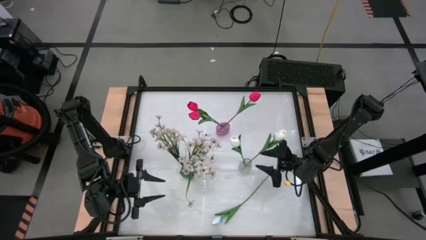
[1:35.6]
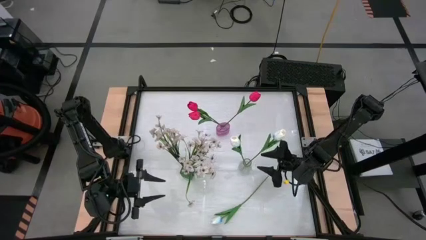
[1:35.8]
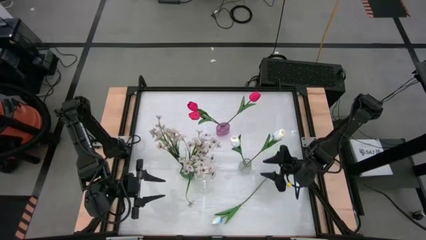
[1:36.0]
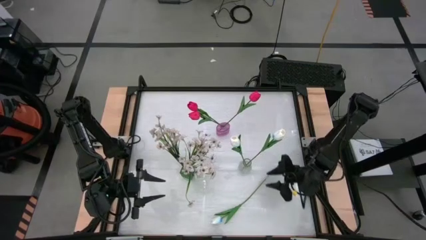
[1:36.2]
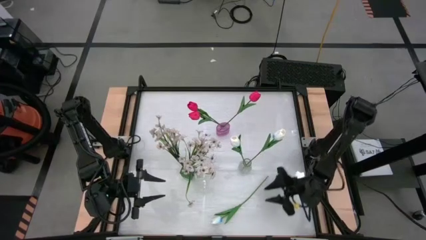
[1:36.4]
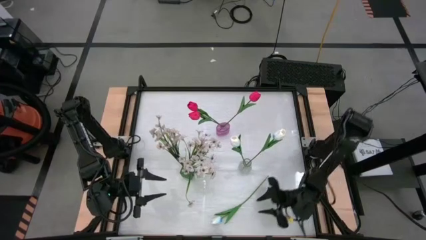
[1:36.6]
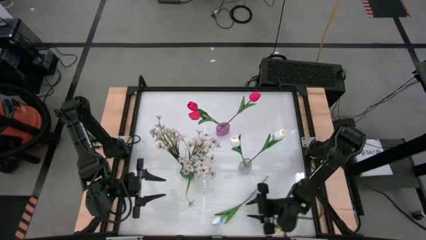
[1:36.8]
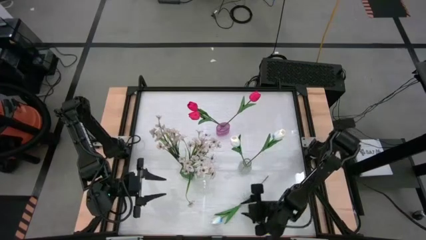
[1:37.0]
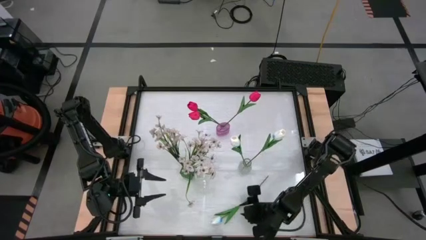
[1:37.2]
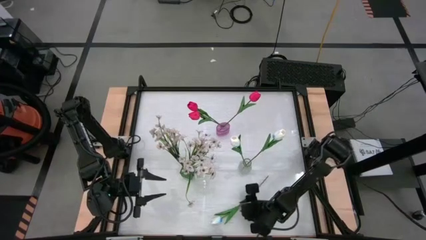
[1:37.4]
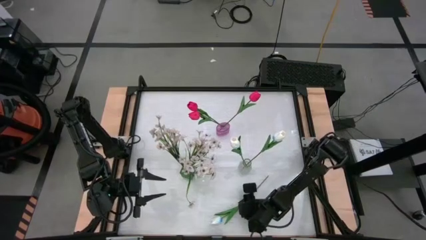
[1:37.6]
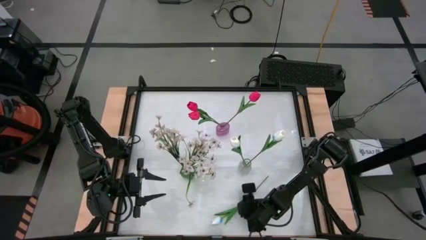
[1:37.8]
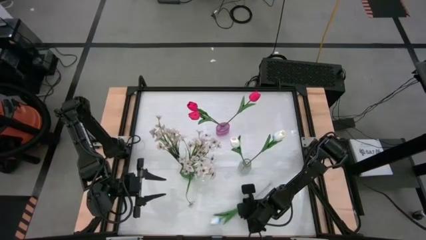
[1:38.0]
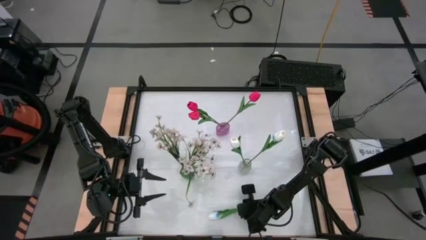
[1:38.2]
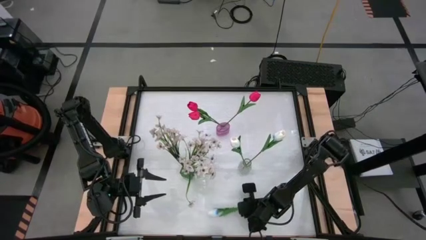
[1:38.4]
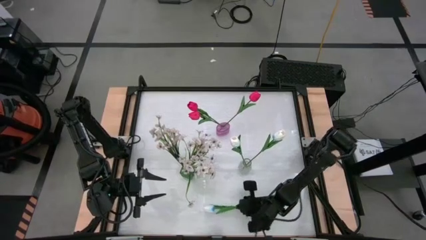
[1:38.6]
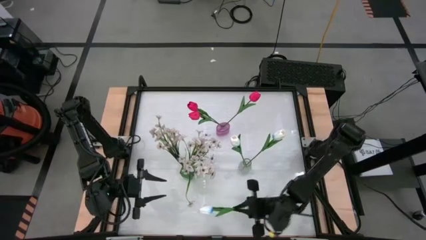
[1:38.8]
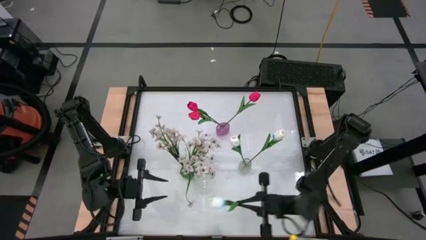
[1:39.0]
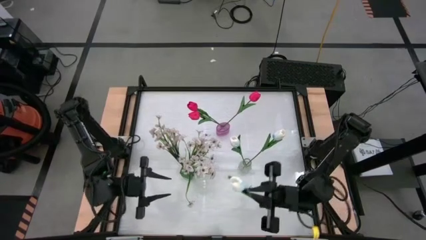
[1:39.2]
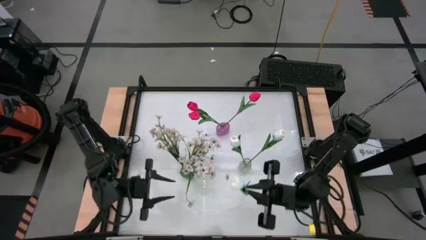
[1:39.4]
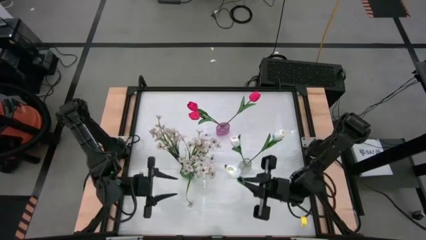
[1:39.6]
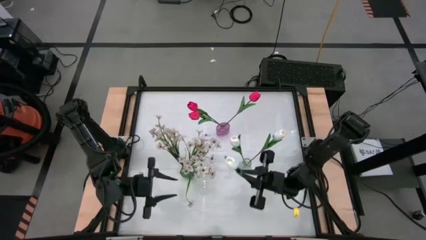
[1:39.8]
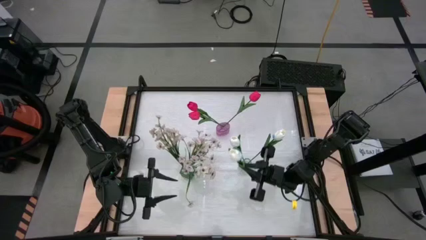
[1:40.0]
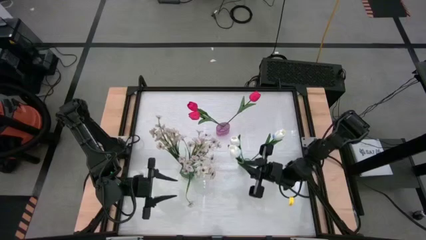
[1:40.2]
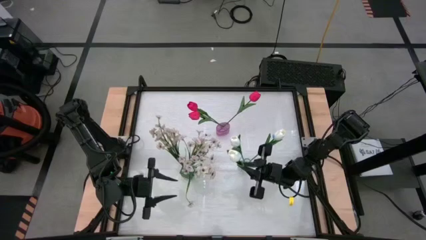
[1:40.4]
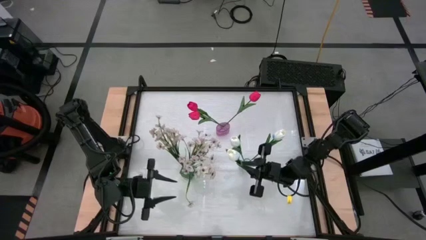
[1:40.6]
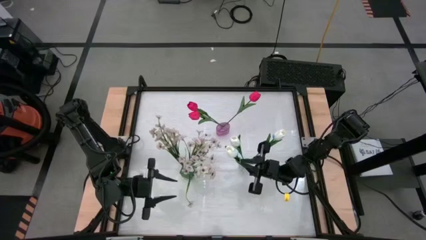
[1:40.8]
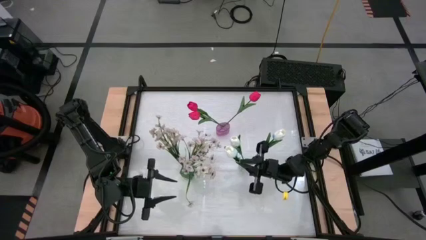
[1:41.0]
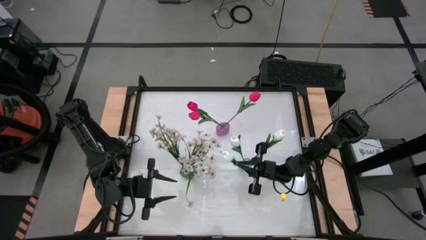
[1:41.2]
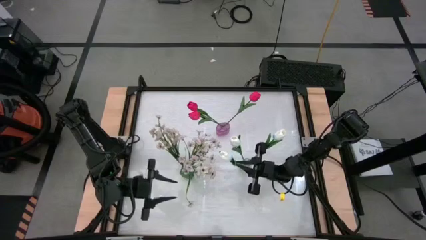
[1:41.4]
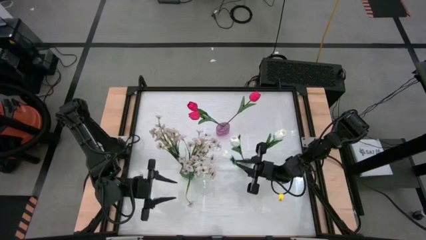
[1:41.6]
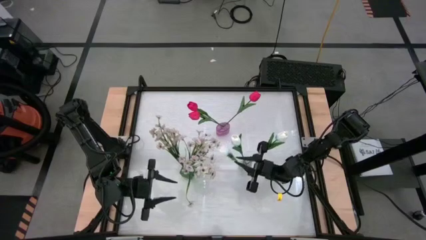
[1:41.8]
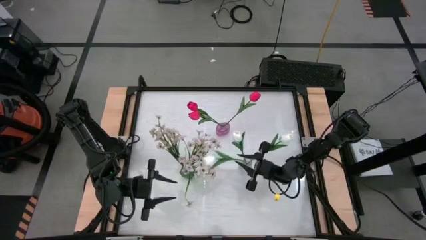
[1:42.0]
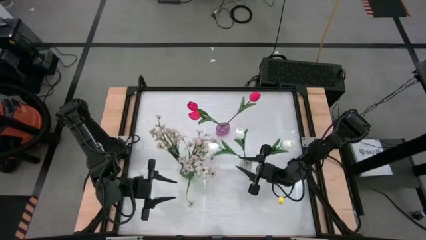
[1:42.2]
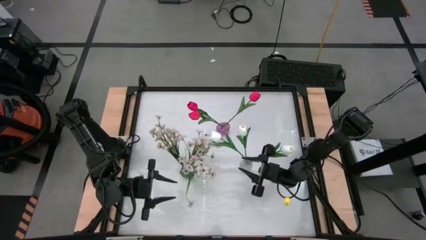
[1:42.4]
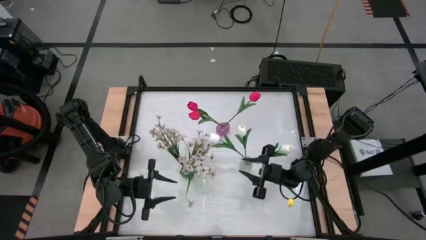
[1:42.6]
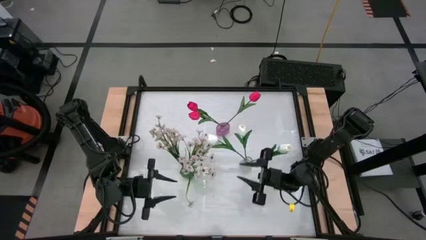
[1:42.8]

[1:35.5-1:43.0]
Task: Sort flowers into vase by color
Put the white flower into the transparent vase

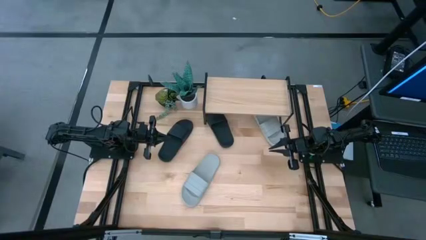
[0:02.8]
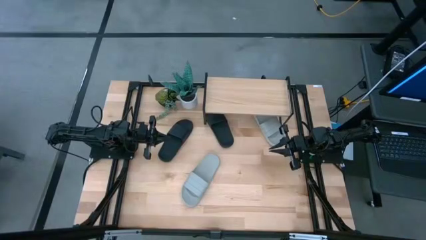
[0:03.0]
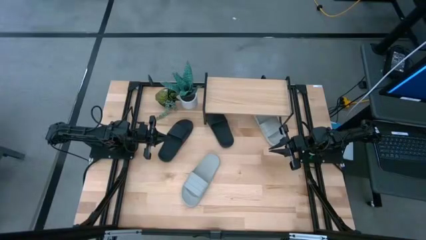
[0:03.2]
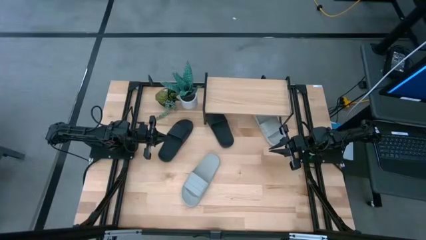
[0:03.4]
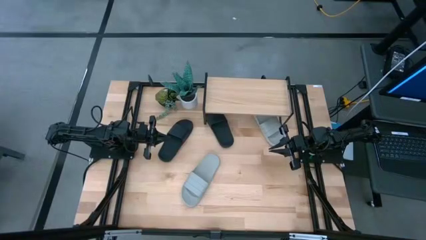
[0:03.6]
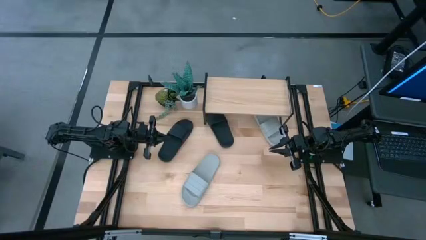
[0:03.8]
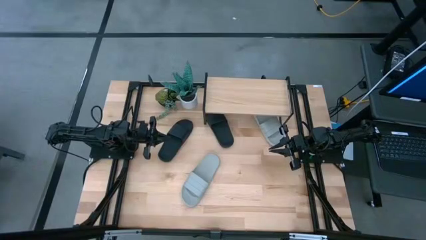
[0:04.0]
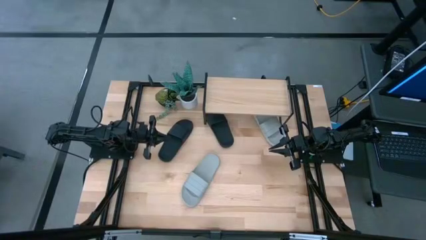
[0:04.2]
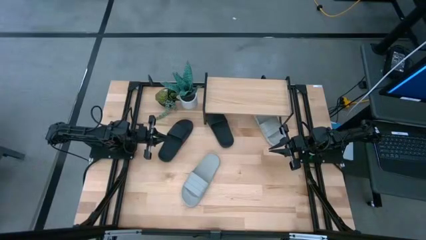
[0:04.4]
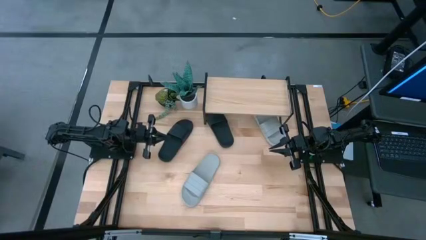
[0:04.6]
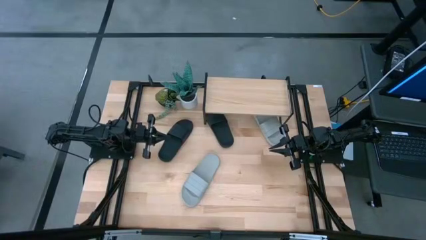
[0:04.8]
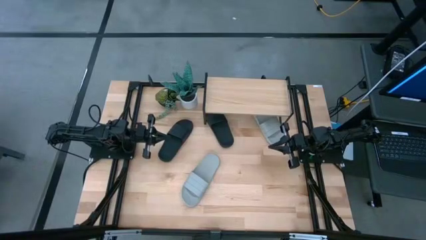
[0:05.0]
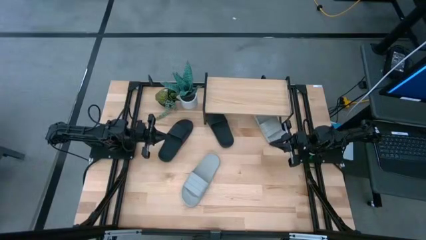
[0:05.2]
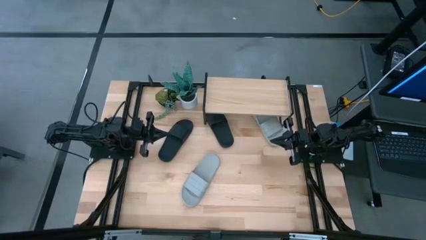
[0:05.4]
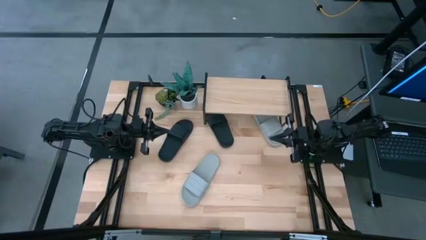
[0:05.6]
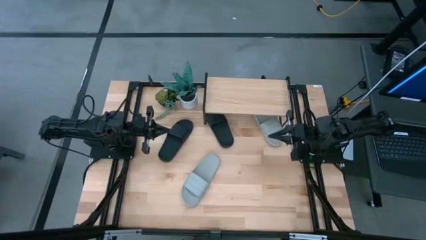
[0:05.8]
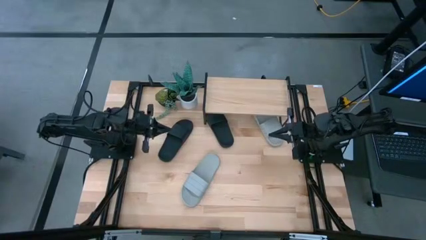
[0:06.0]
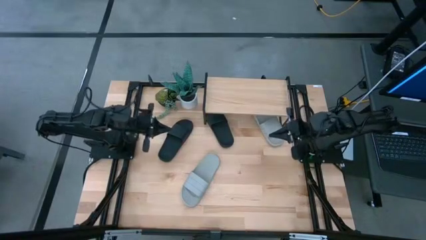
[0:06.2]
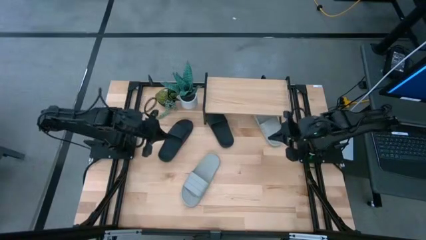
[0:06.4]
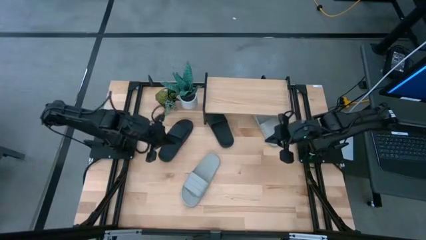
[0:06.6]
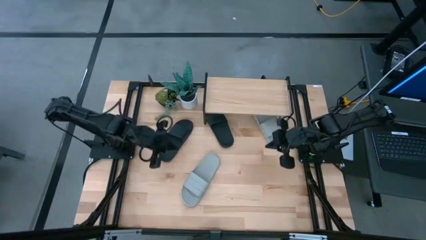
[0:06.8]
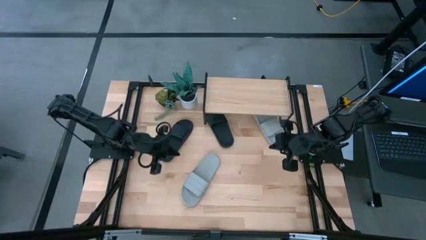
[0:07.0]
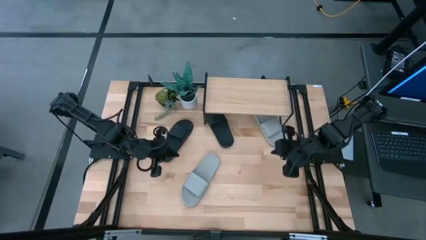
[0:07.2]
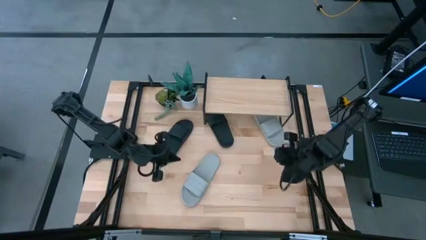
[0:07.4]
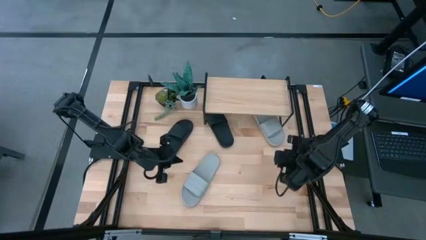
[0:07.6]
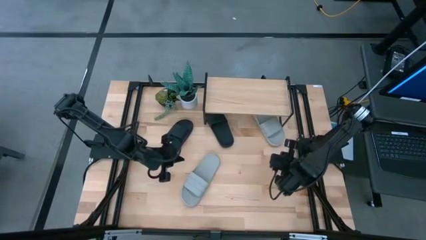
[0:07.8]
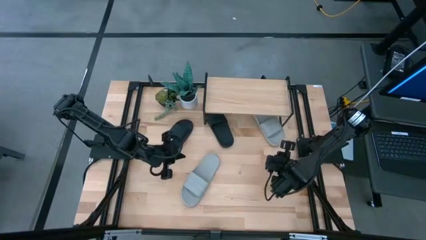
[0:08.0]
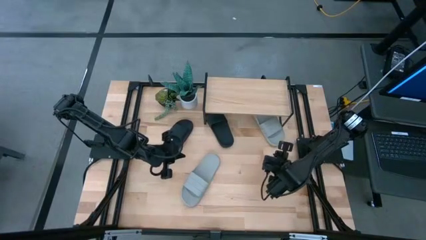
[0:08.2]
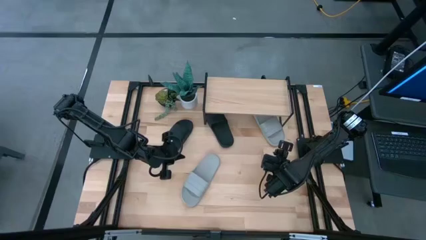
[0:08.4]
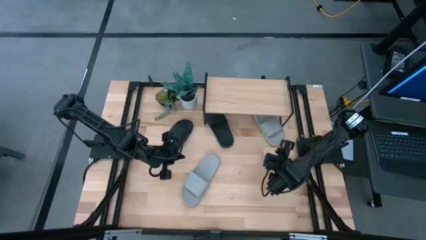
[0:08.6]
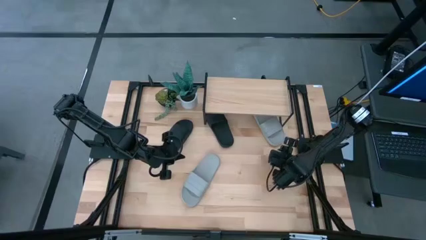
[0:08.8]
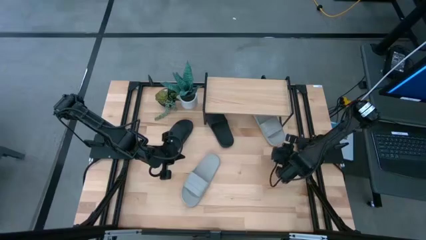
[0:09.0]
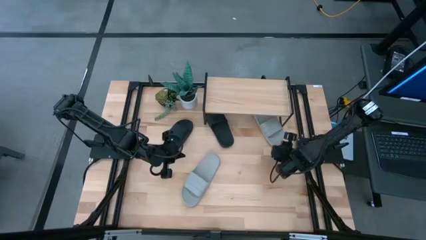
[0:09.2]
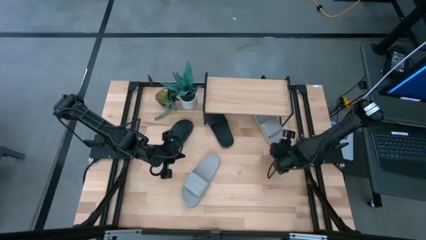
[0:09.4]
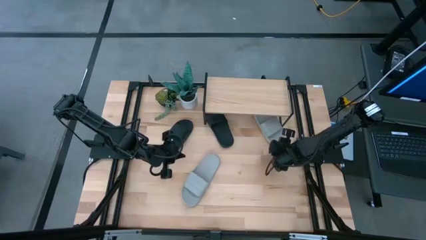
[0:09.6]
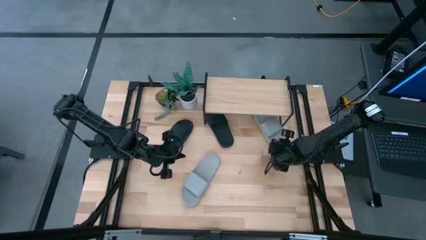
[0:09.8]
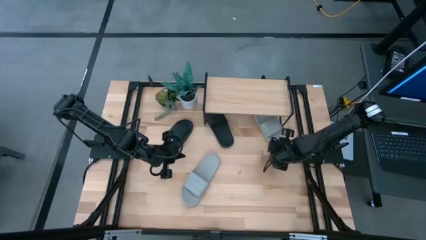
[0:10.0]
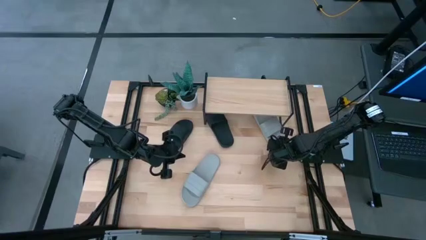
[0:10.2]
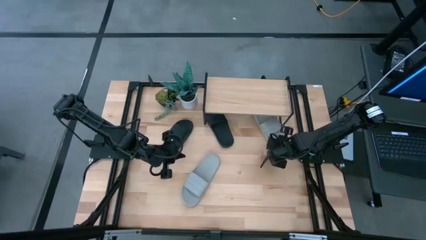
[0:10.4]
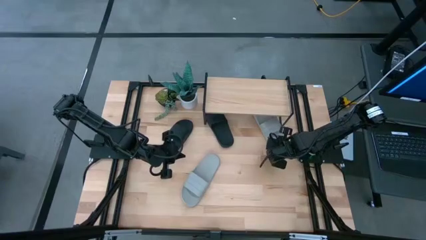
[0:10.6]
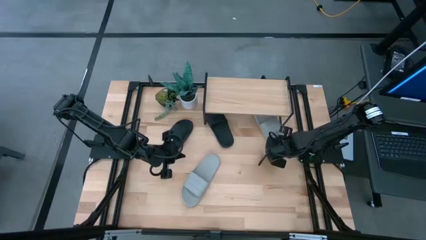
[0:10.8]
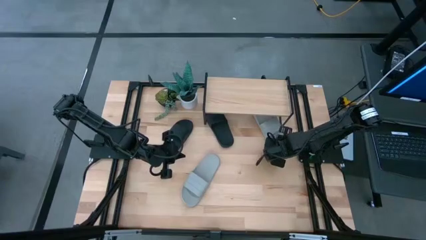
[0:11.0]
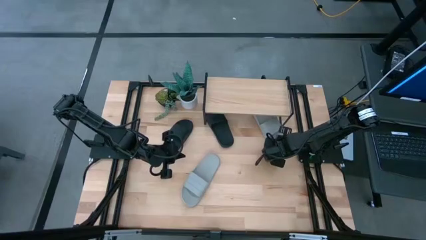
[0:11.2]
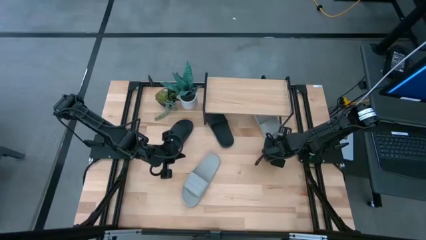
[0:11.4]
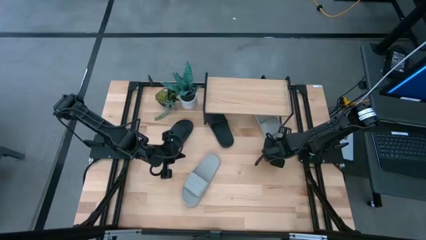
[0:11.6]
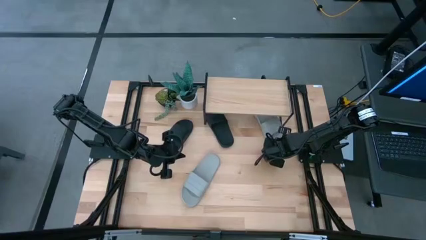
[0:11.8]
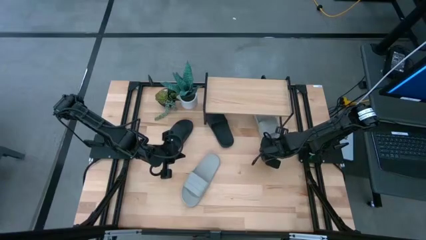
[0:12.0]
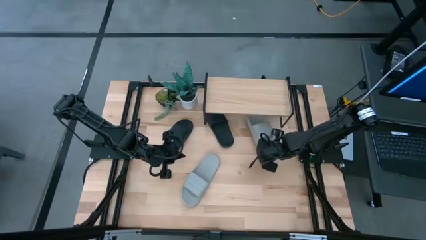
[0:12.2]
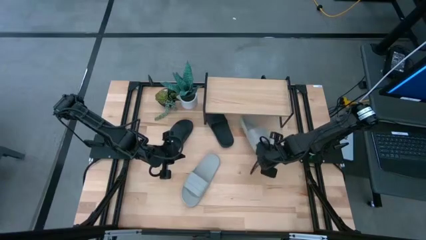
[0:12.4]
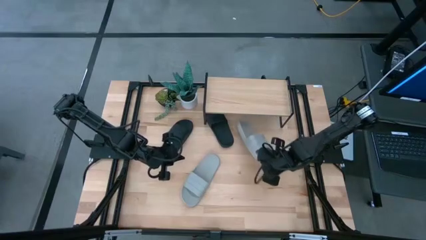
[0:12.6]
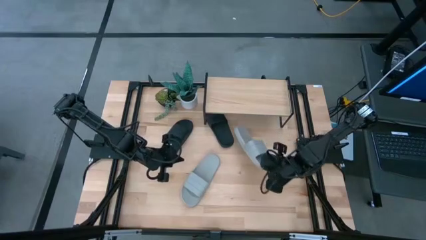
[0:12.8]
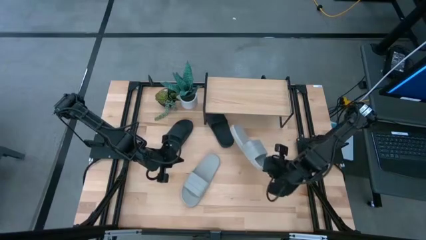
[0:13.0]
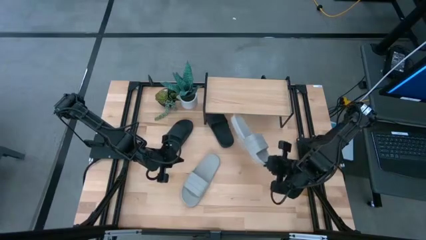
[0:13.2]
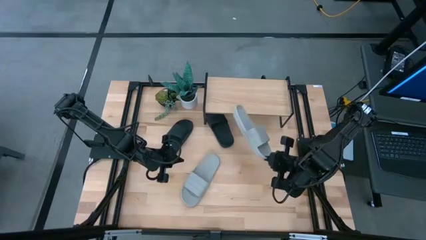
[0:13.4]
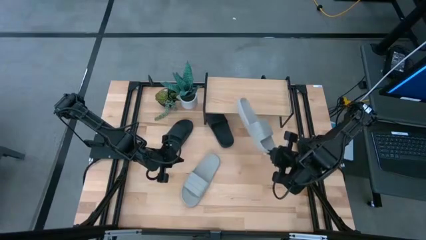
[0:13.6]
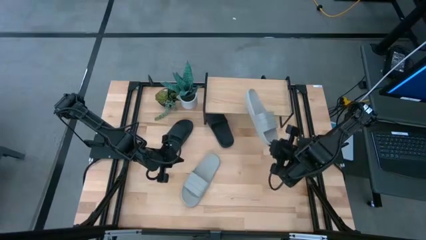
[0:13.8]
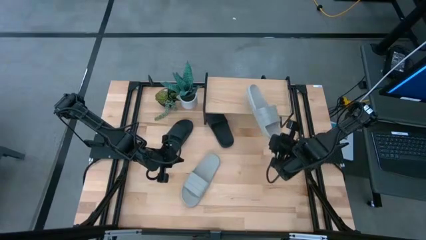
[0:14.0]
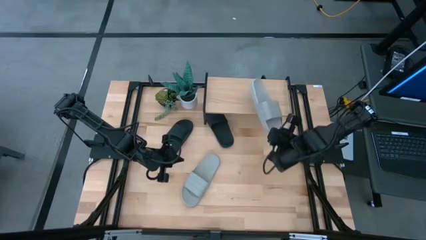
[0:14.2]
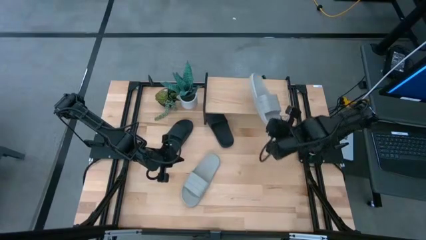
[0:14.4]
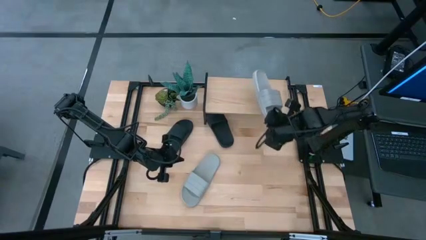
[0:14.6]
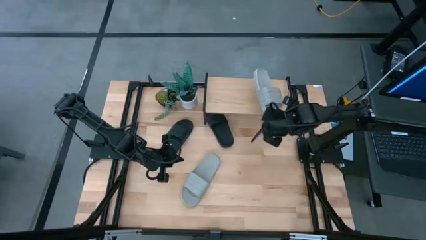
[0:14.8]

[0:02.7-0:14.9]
Task: Pick and place slides into the shelf
Put the top gray slipper on the shelf
